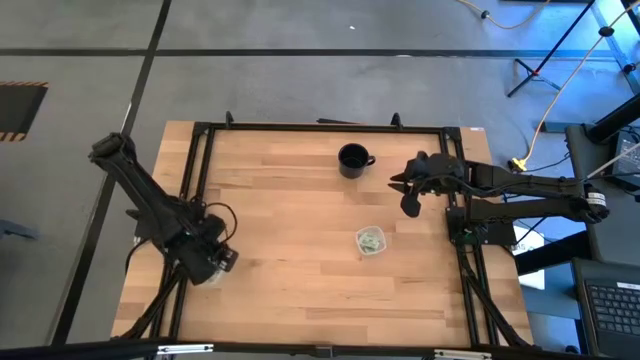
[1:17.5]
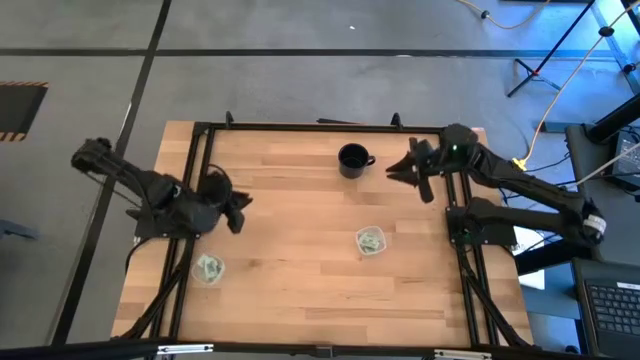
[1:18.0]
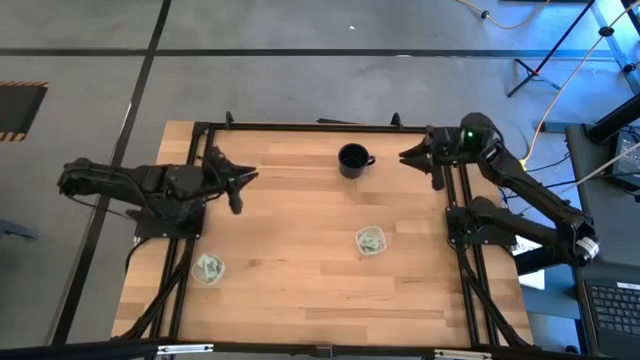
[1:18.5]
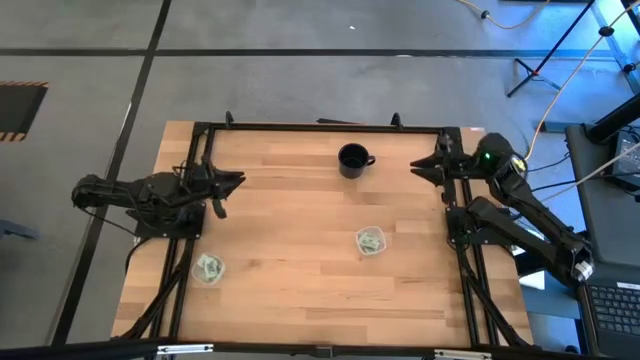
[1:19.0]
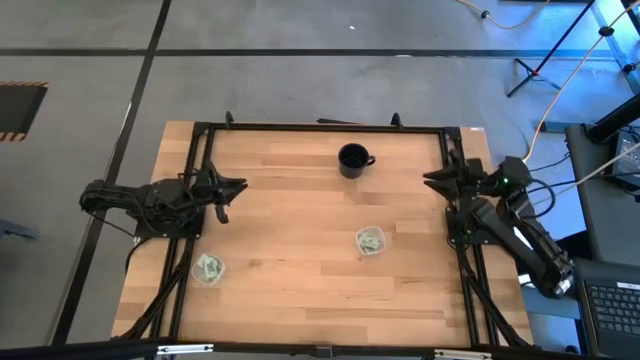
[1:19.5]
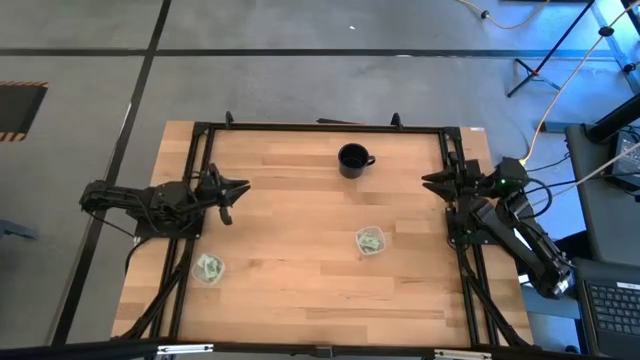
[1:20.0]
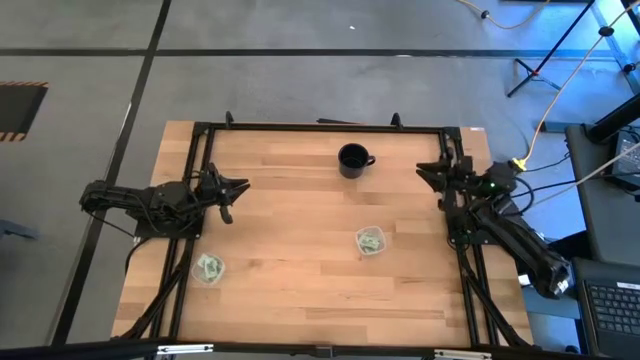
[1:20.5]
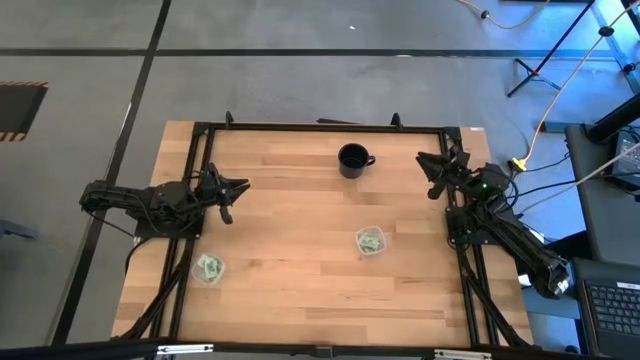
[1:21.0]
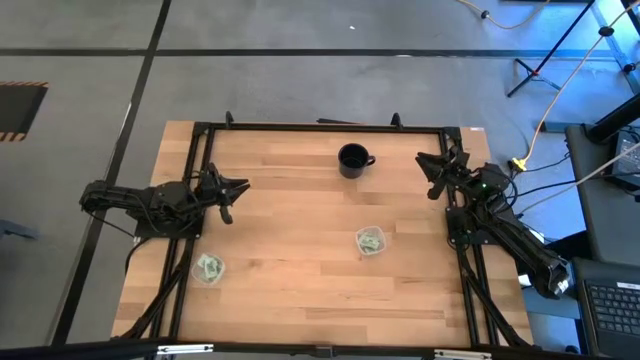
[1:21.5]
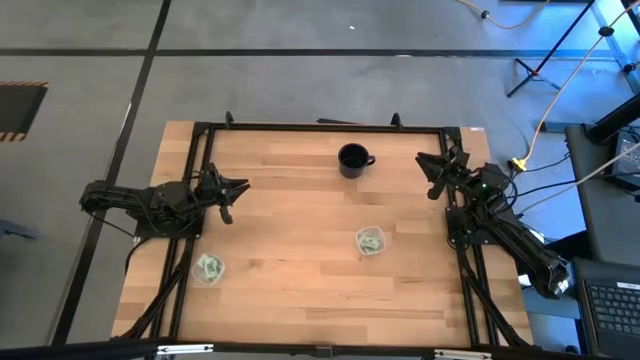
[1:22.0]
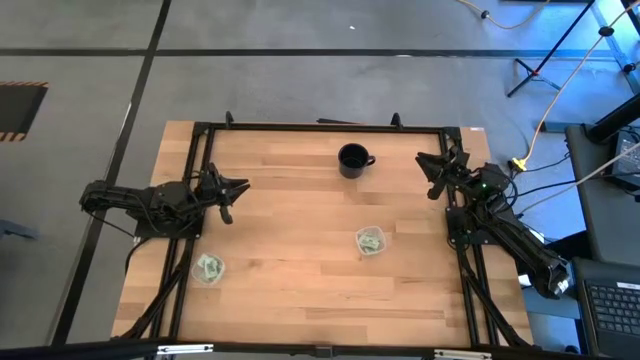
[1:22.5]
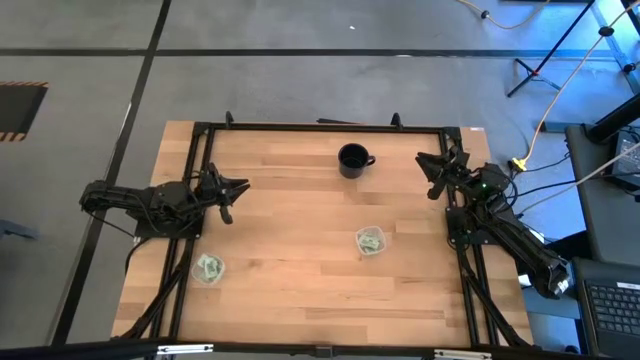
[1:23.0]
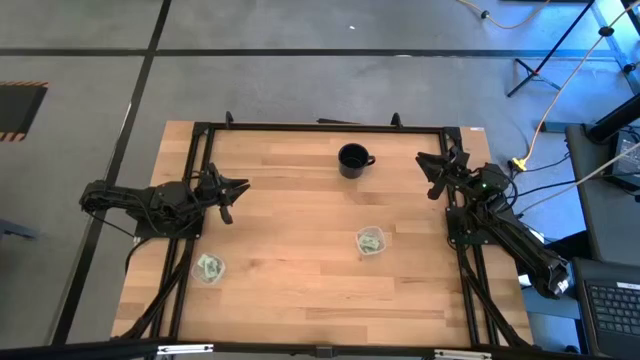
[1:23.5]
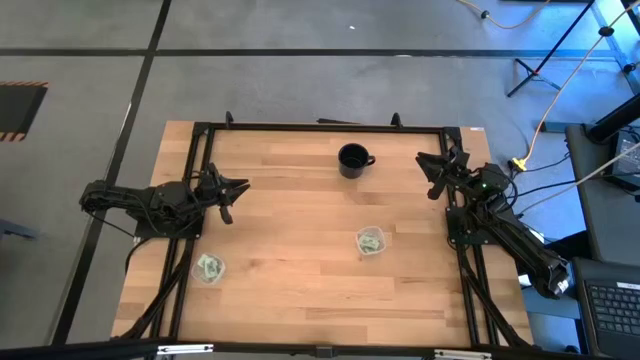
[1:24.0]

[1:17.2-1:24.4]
Task: Pick and place Stevia / Truvia into bins
Return to Home Position

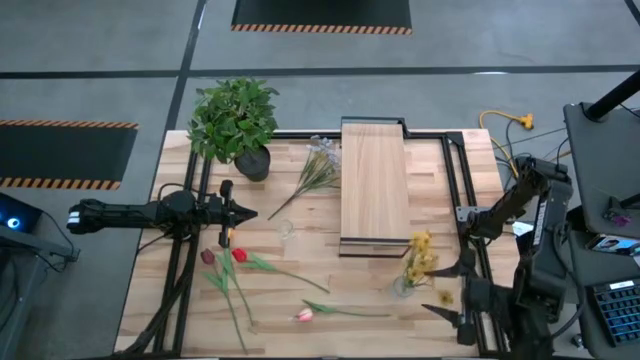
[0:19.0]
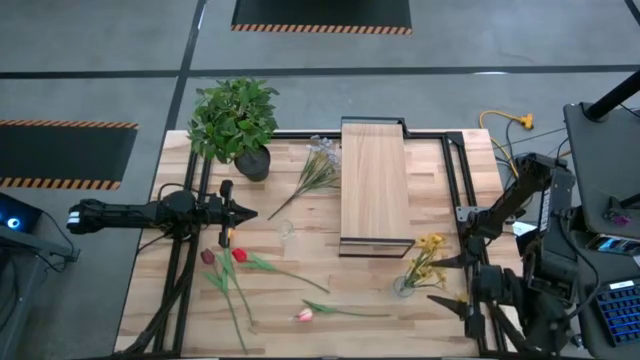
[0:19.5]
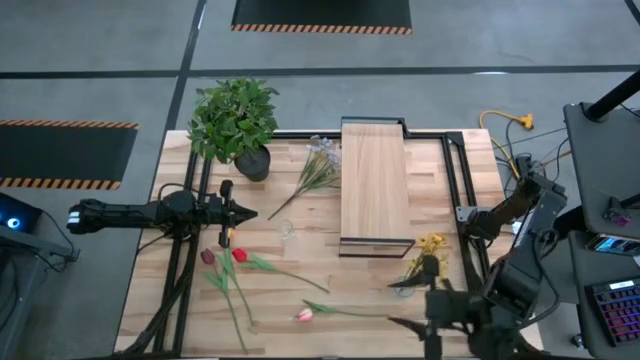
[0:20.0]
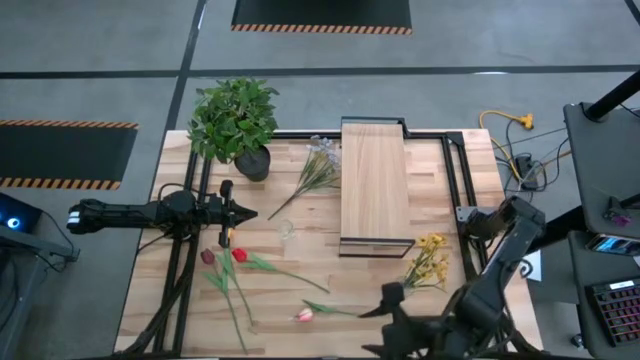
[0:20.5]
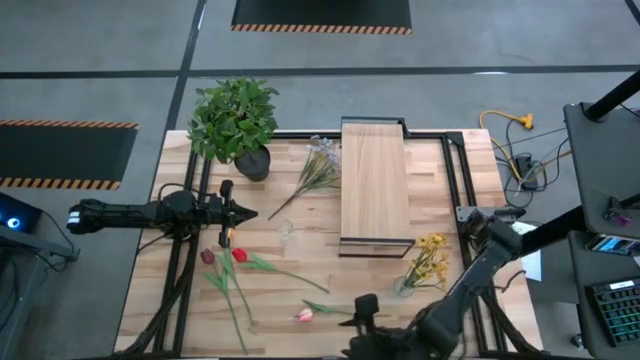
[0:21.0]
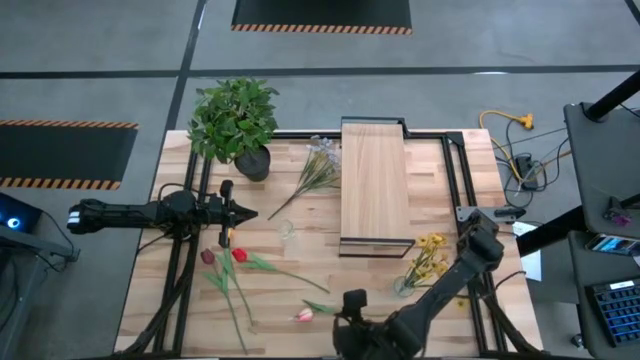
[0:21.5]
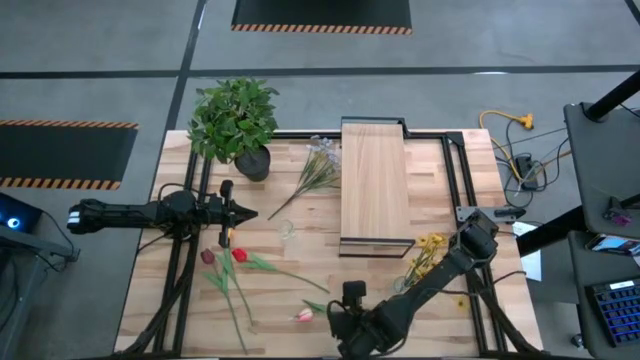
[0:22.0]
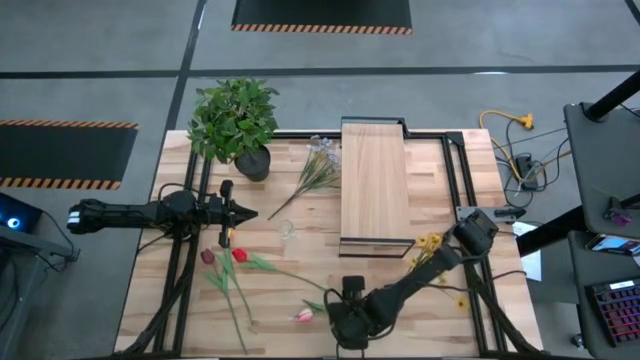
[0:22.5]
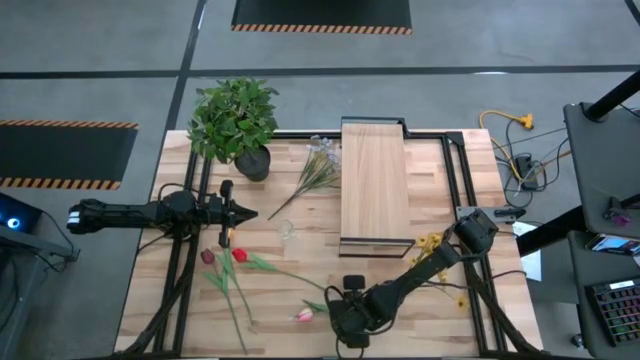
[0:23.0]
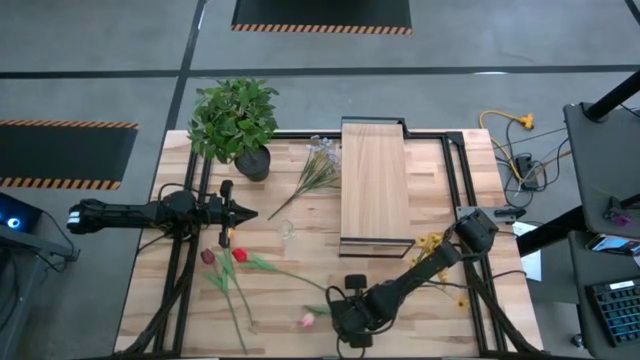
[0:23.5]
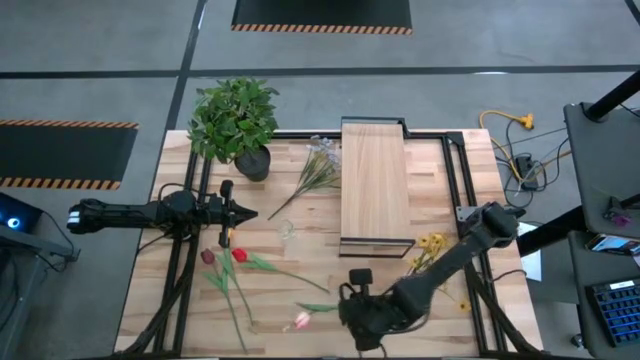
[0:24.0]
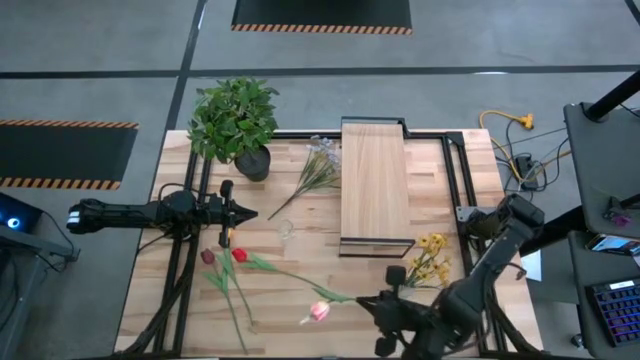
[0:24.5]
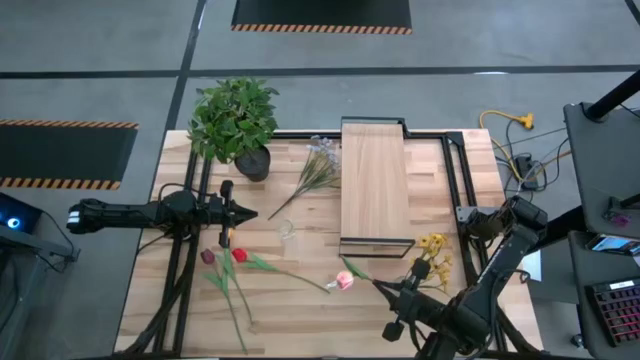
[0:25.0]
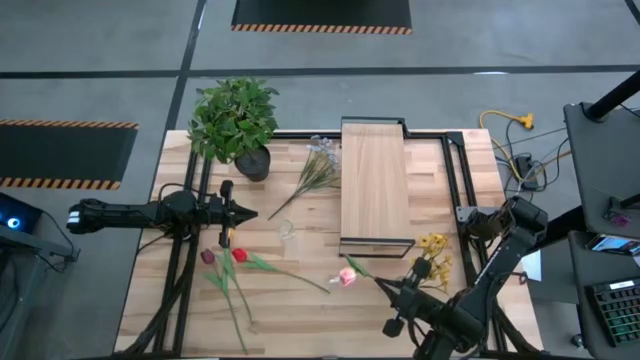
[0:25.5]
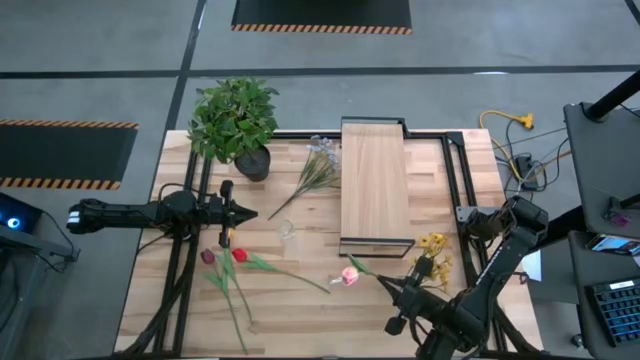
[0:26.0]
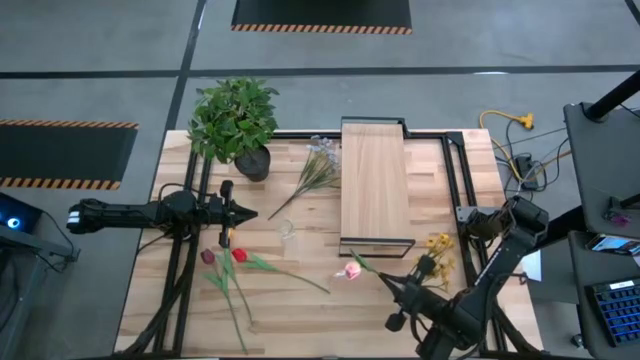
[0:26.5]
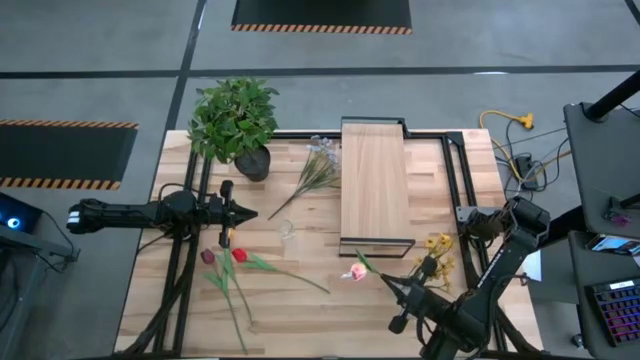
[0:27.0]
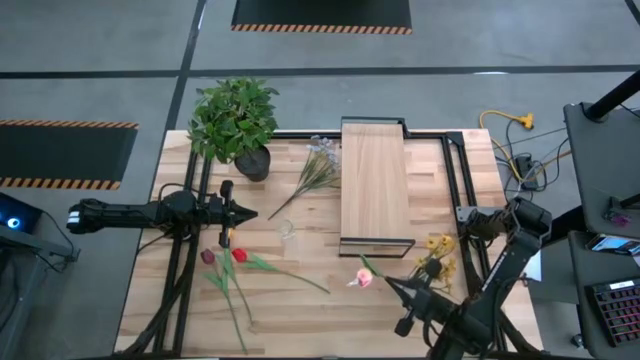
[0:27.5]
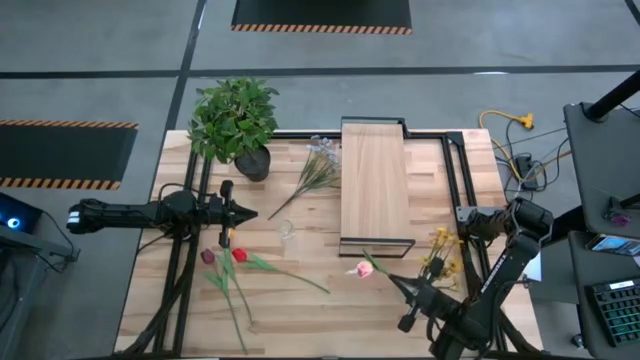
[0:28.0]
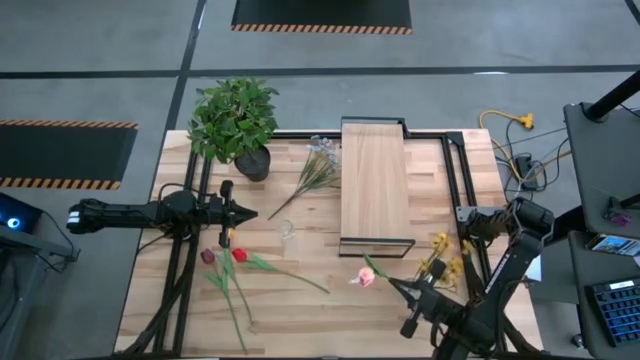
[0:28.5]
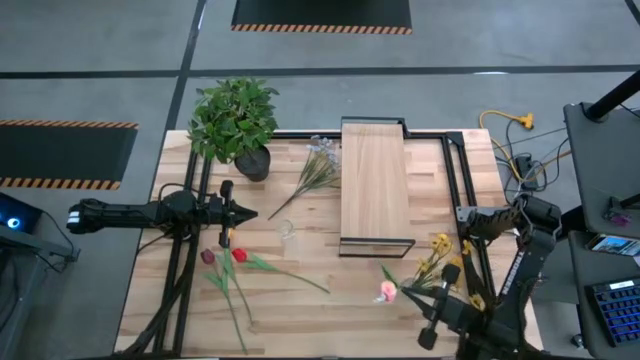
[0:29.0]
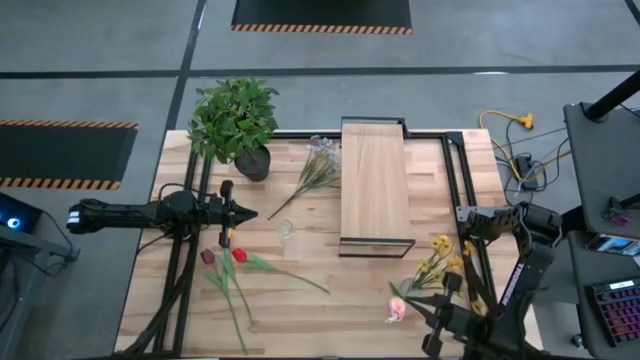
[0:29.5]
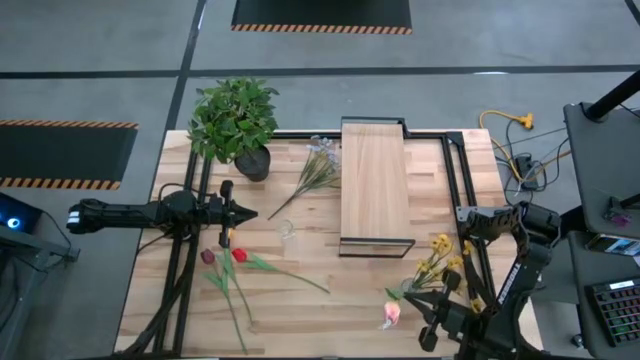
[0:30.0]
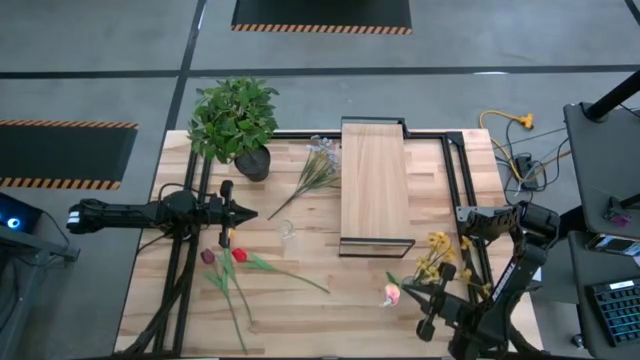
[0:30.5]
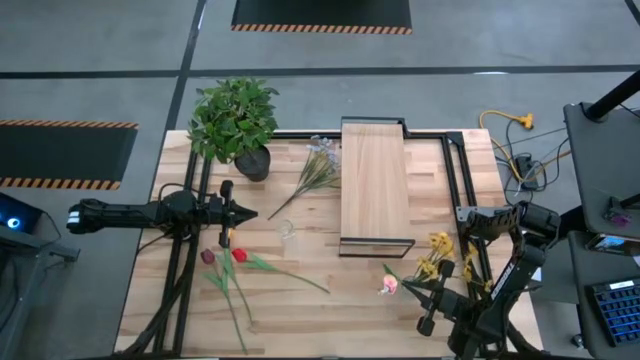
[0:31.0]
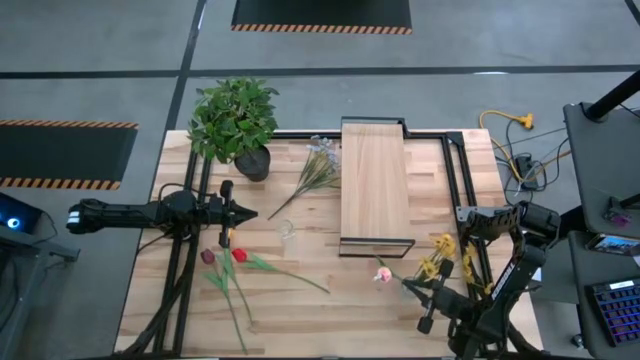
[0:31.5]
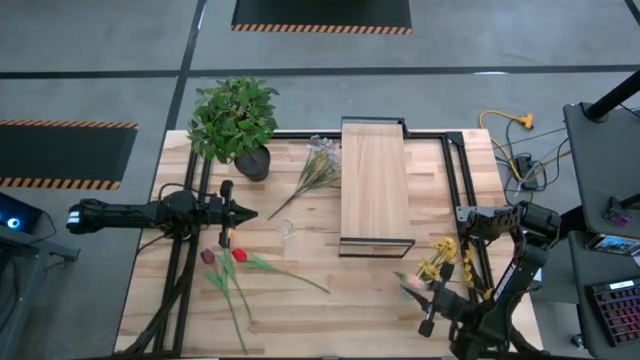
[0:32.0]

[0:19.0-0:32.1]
Task: Pick and place flowers into a vace then onto a shelf
Put the pink tulip into the right transparent vase
